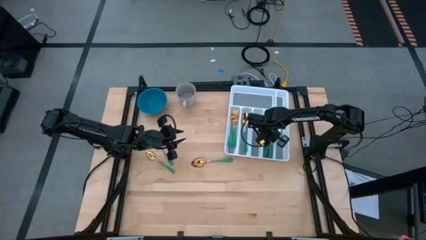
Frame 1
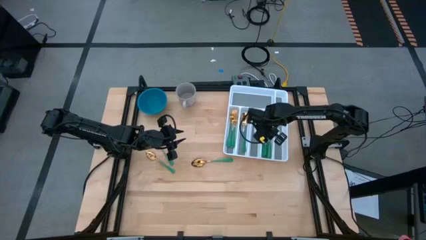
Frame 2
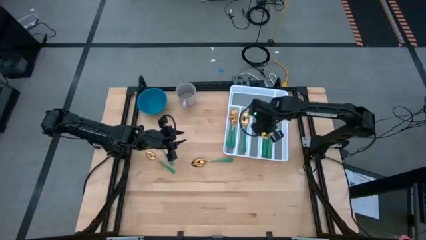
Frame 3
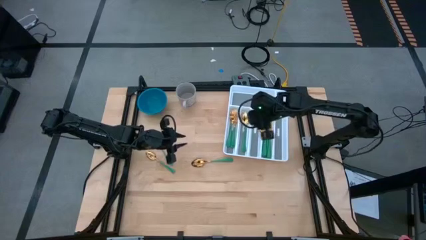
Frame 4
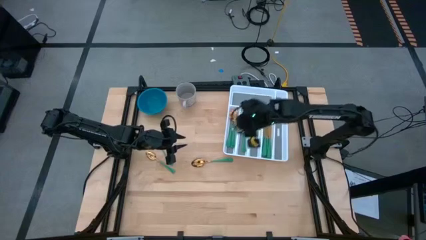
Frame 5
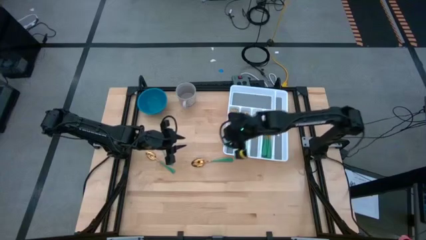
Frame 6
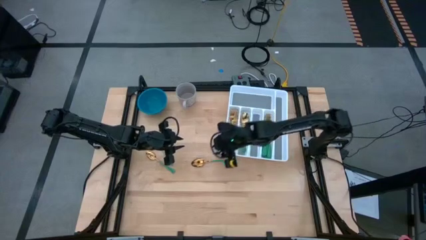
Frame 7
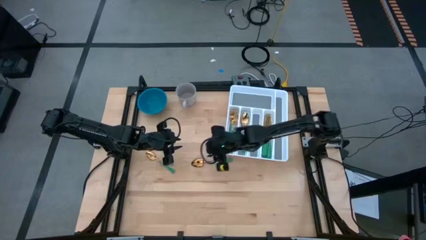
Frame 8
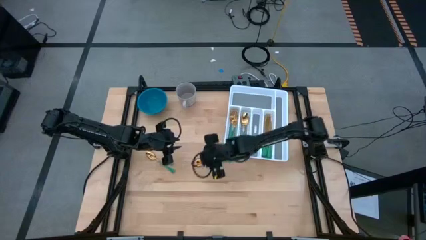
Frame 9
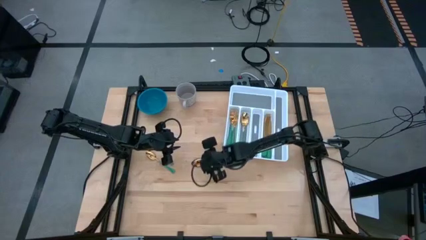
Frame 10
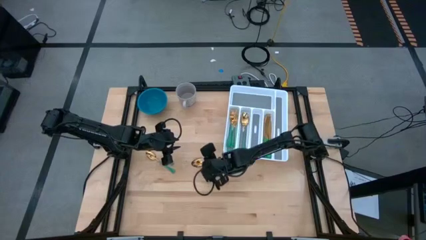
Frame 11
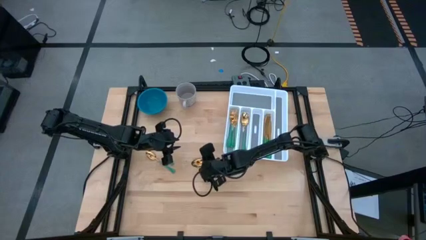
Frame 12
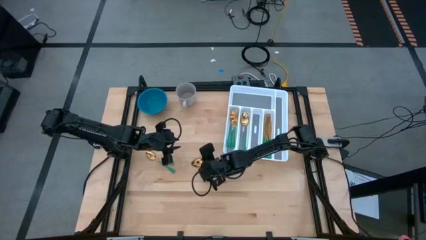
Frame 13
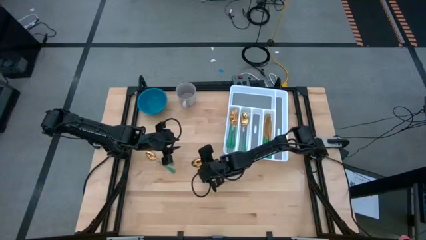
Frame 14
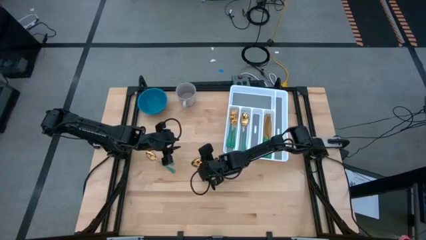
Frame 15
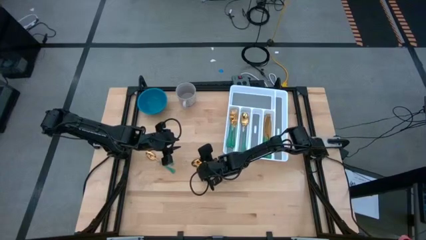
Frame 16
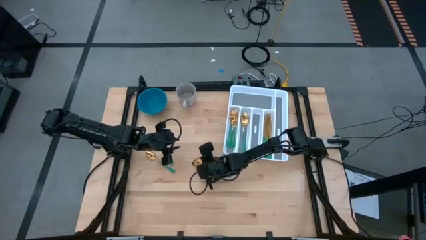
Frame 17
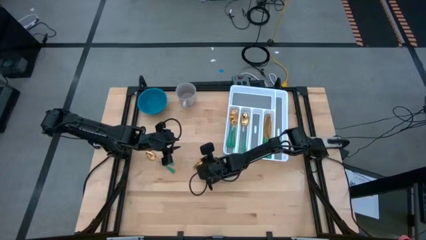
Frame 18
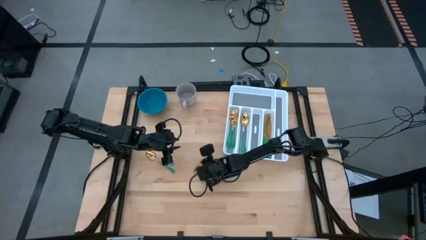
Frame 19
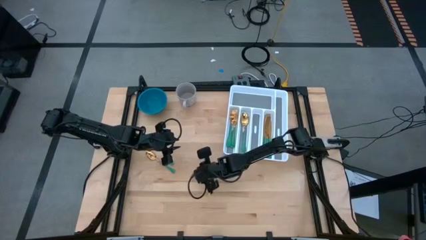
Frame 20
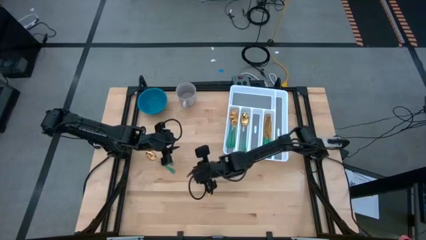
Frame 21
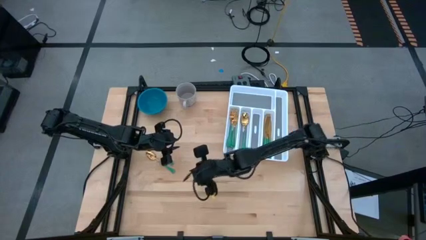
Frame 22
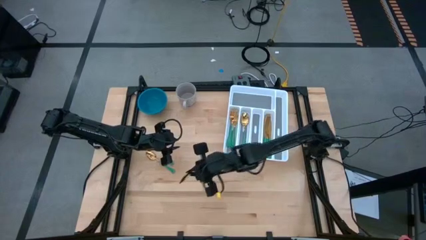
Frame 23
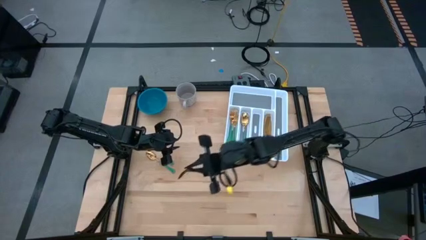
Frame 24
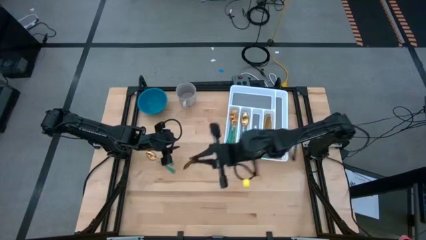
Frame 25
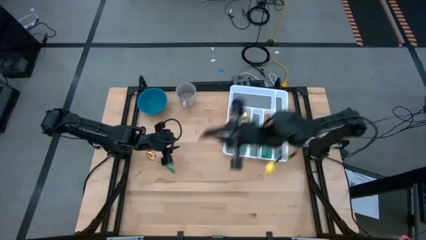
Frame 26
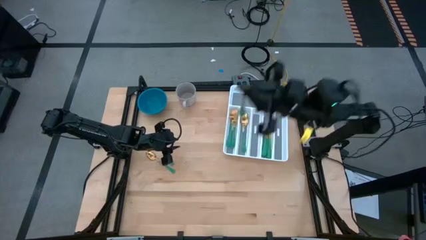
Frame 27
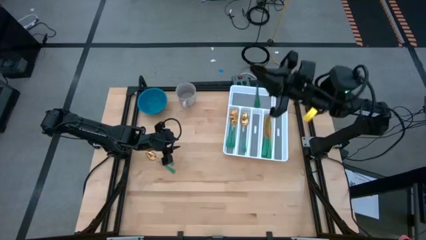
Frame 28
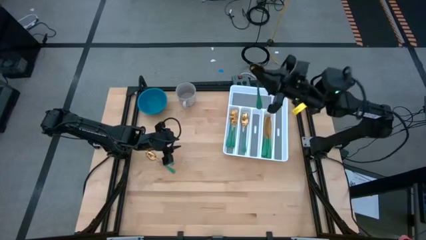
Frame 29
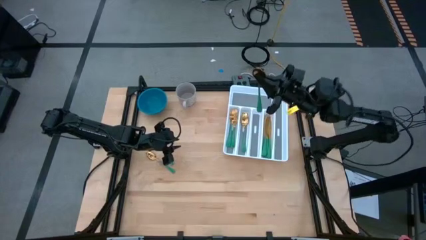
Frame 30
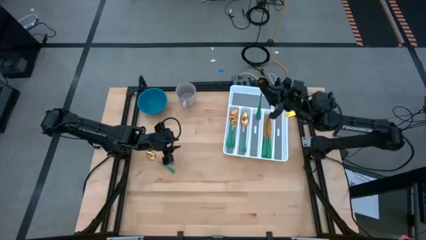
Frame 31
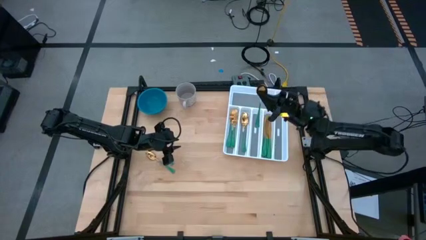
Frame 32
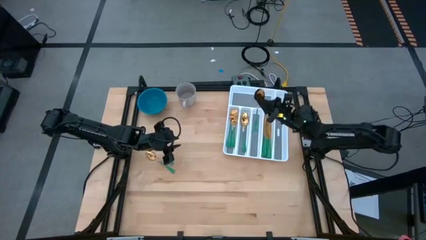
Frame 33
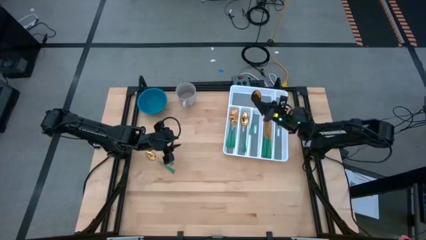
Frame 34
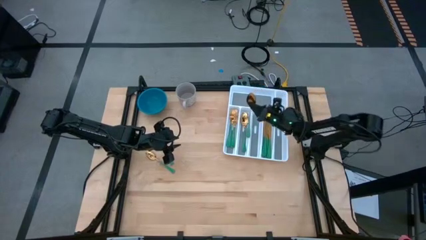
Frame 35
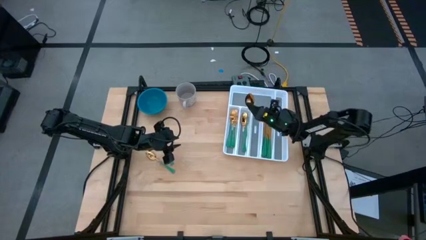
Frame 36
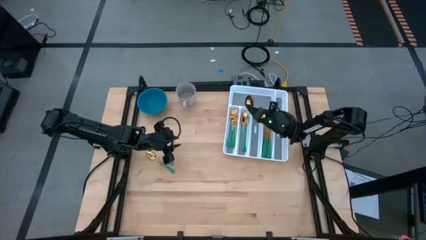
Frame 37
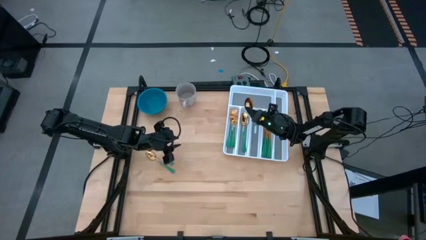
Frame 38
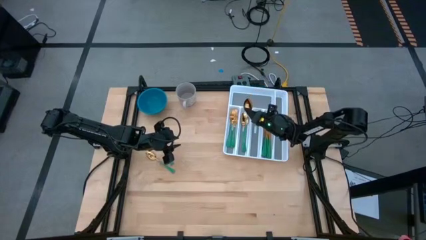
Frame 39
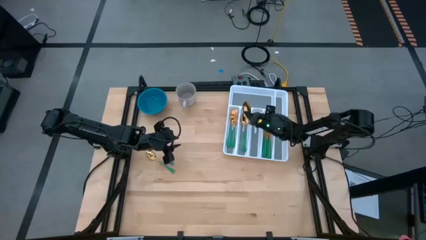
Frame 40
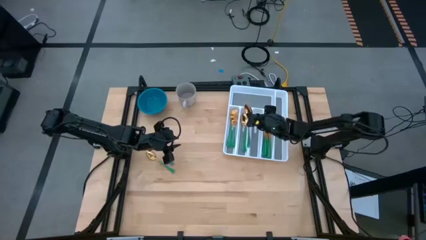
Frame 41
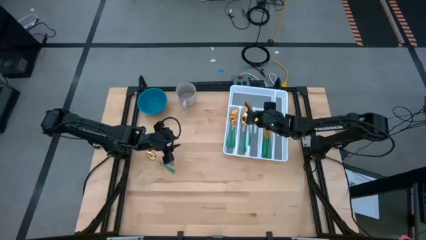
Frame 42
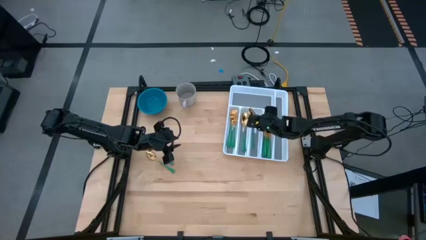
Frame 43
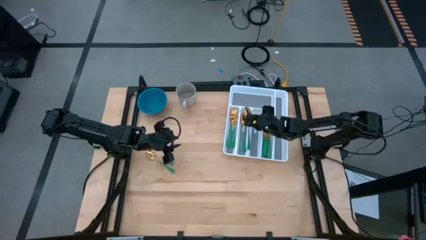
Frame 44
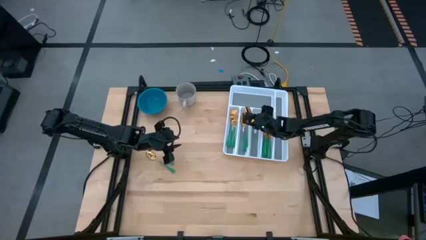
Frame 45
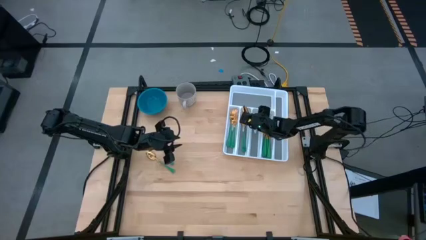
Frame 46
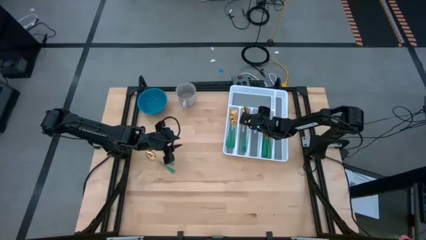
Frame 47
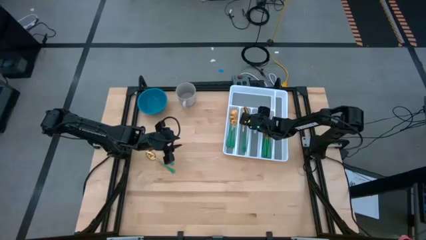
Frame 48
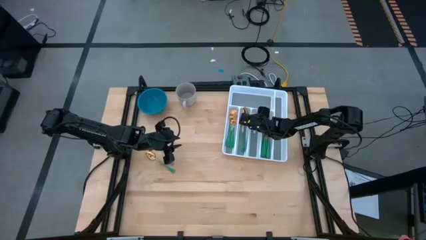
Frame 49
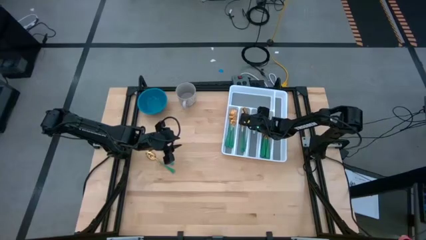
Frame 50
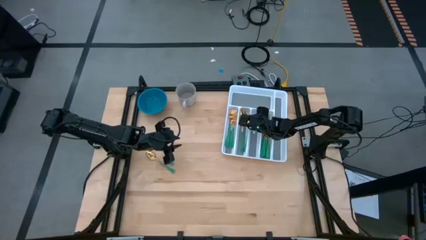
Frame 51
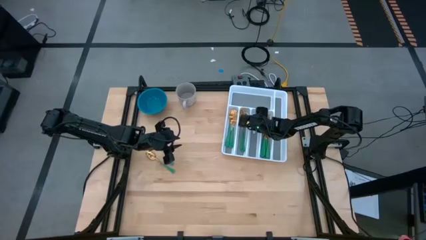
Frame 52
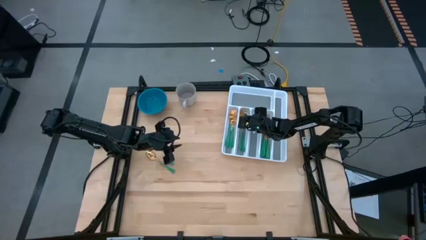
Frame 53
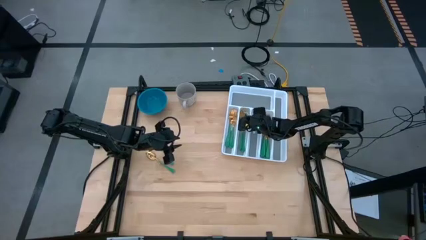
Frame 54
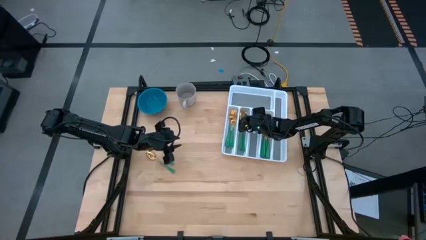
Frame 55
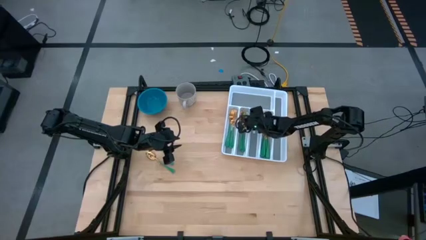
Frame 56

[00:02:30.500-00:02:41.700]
Task: Sort silverware
Put the green spoon into the white silverware organizer

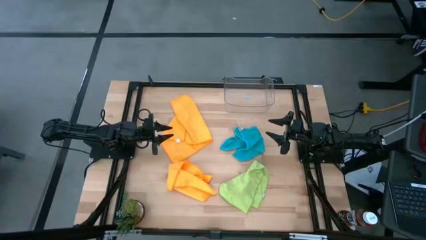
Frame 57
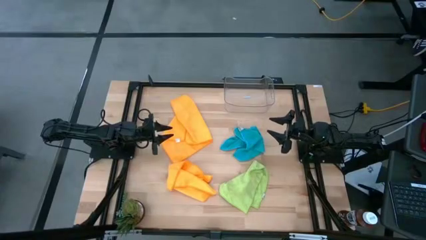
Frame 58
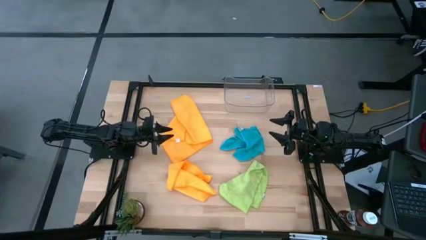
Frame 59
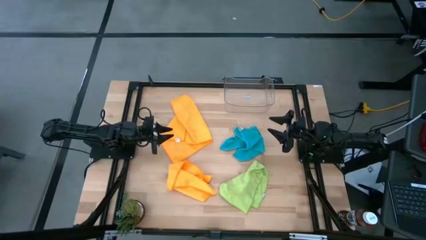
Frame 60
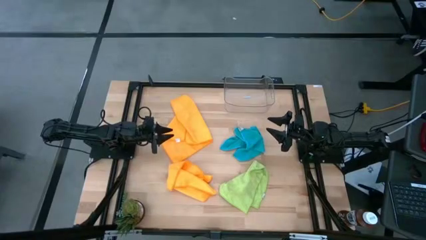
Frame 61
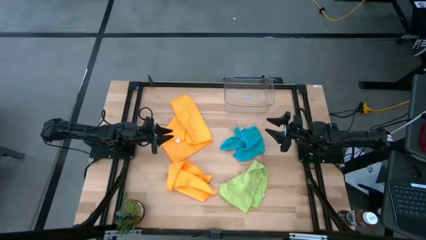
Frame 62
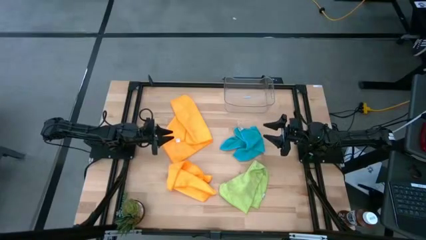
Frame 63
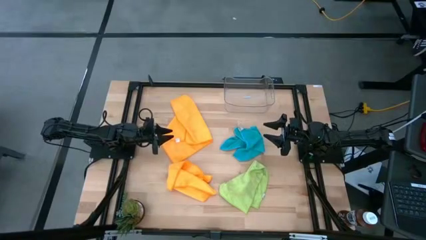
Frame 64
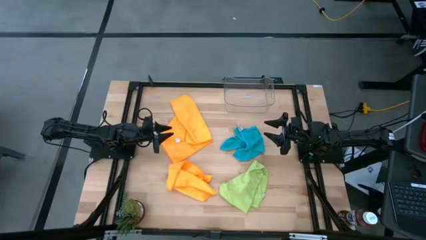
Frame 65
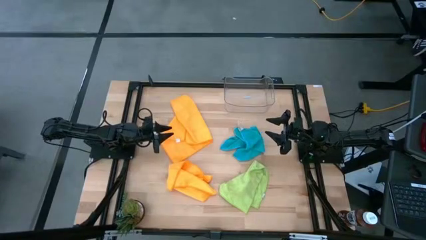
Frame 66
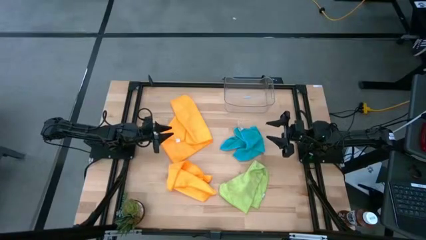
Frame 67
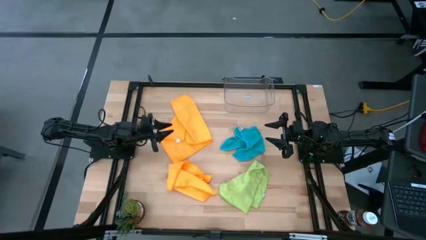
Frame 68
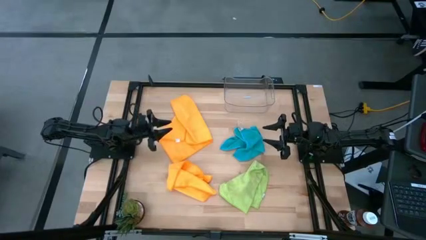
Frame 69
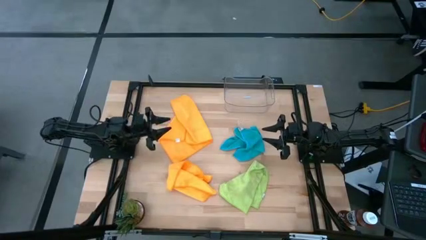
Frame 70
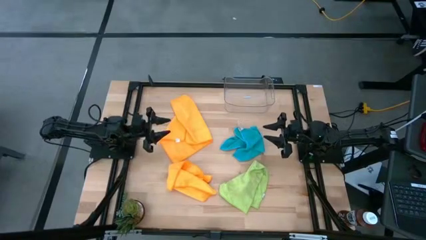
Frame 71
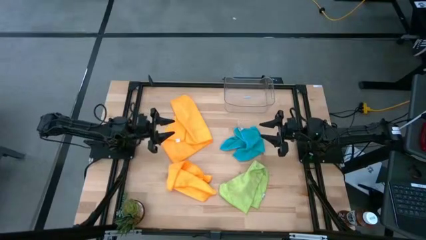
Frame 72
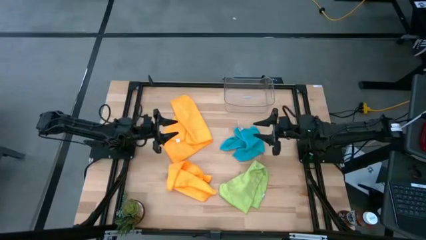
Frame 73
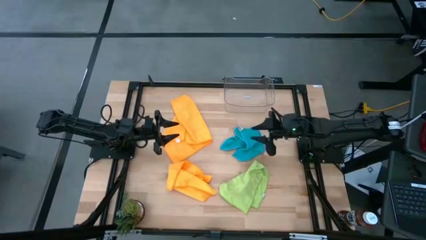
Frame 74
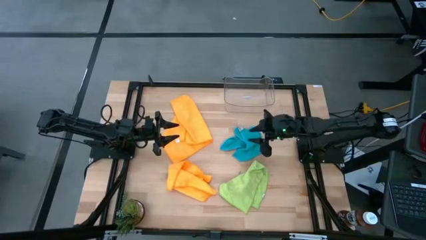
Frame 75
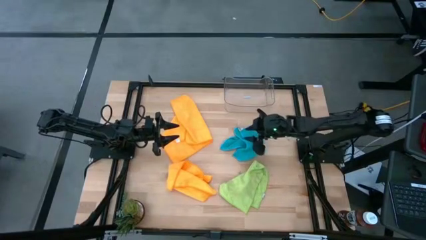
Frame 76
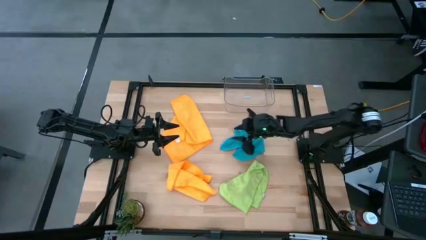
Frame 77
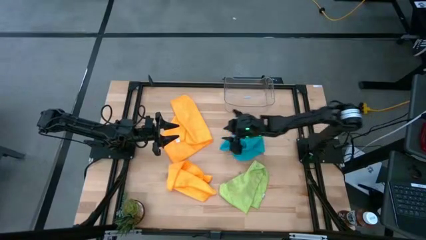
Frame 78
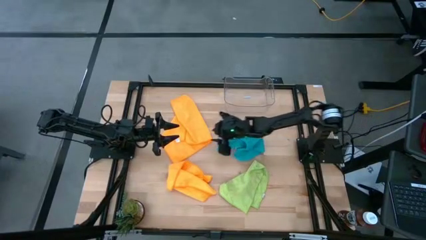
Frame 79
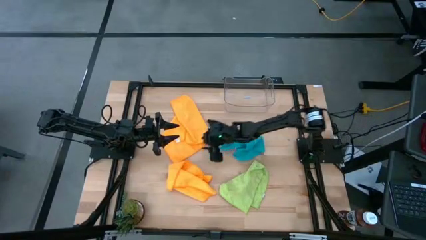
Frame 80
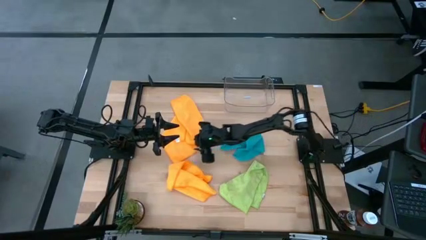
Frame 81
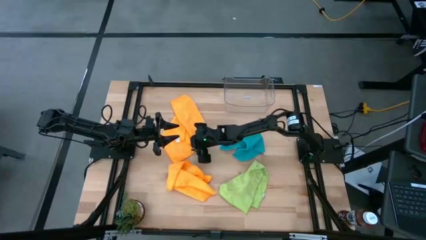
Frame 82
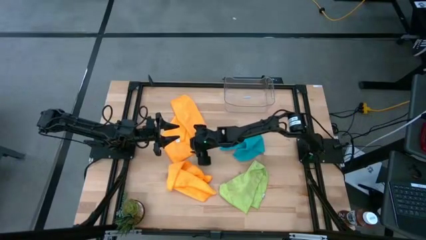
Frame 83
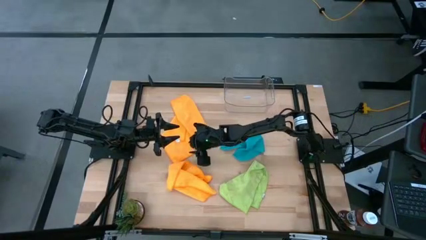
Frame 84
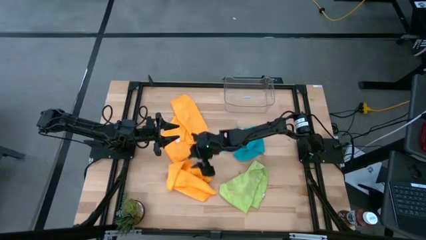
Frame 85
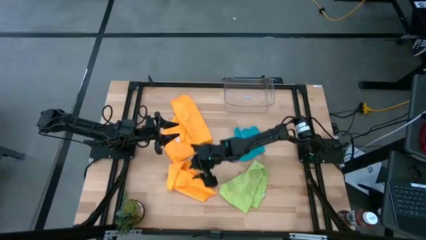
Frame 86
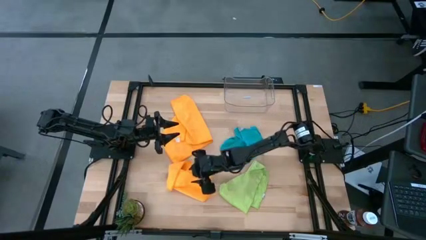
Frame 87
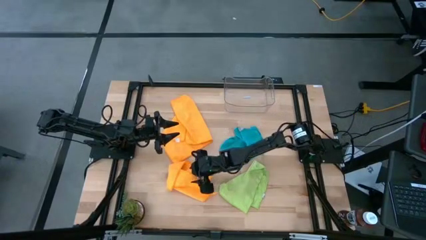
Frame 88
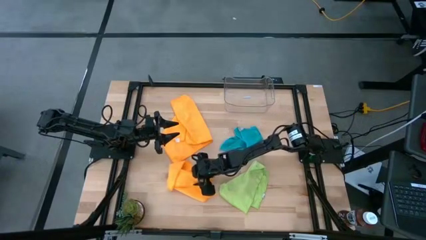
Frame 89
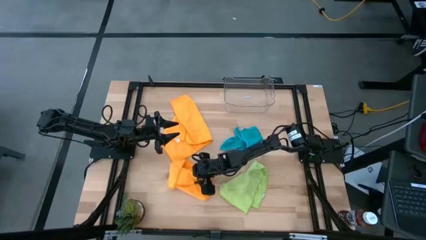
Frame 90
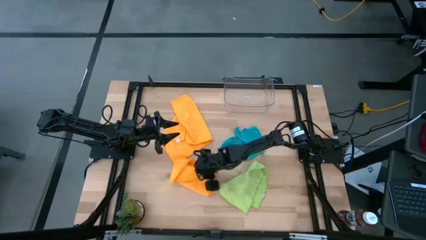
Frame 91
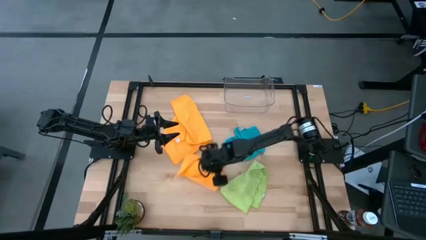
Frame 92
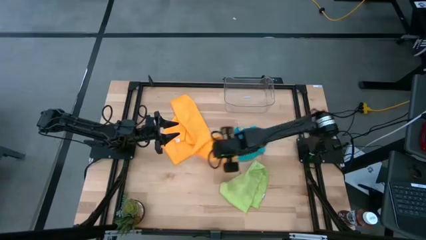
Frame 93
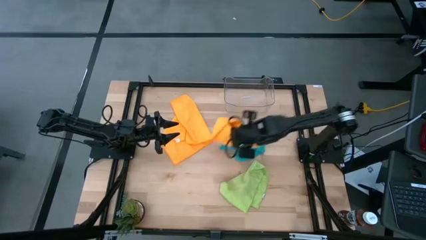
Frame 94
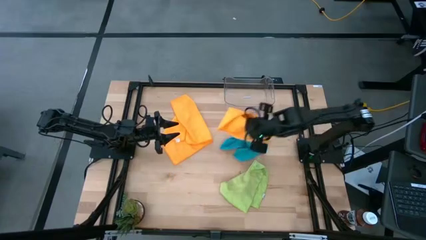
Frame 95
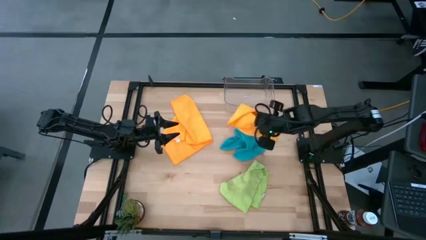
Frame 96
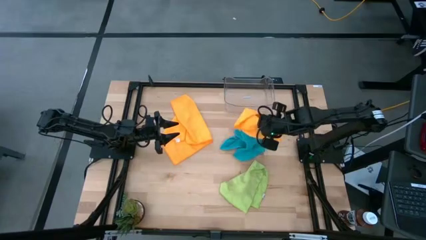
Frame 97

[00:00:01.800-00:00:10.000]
Task: Fold microfiber towels
Move the bottom yellow microfiber cloth to the right of the table
